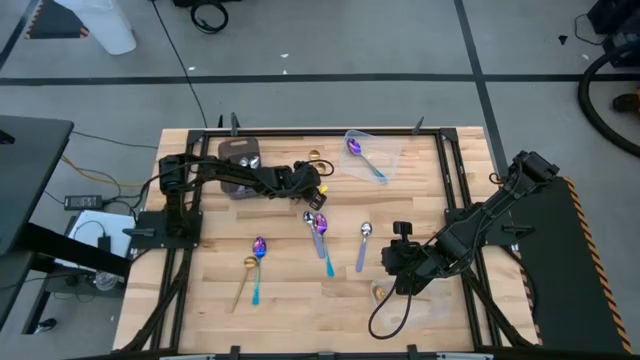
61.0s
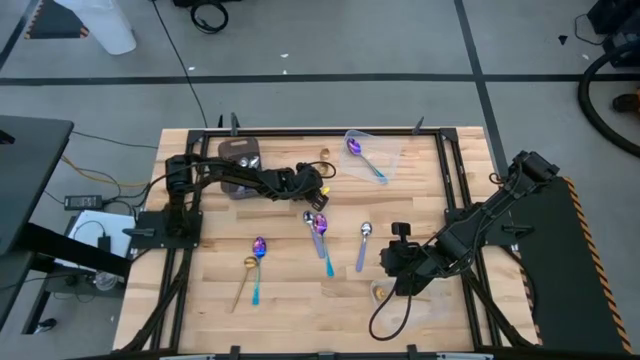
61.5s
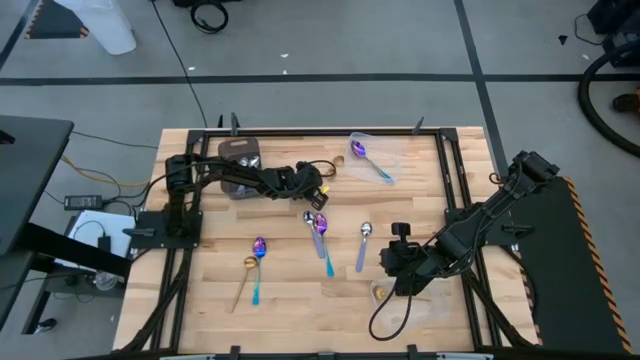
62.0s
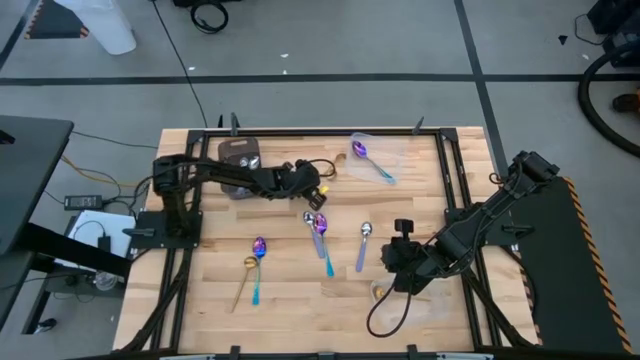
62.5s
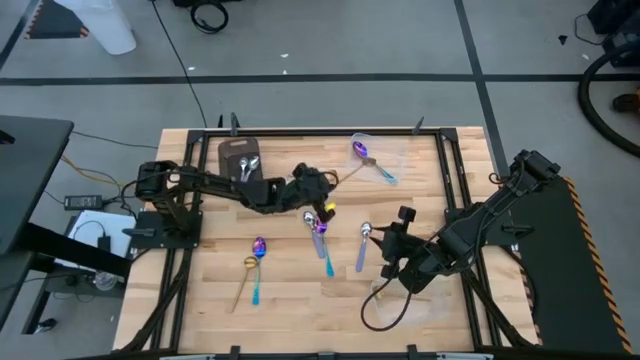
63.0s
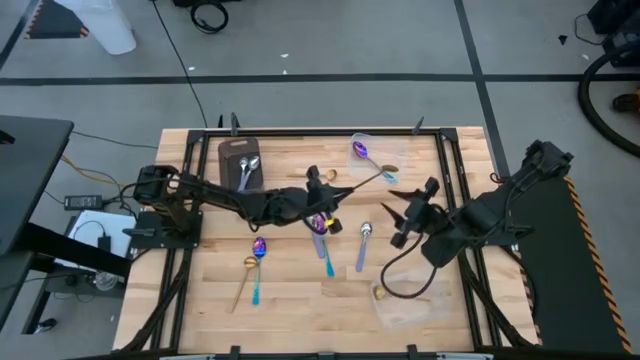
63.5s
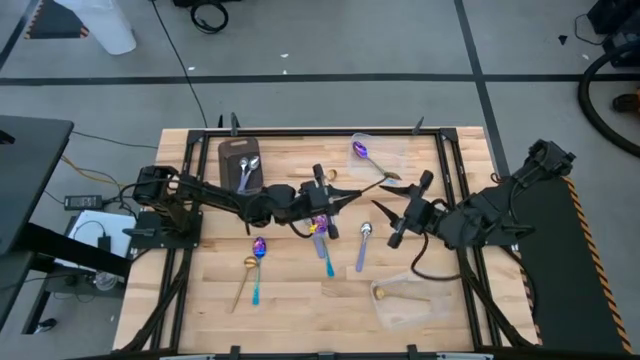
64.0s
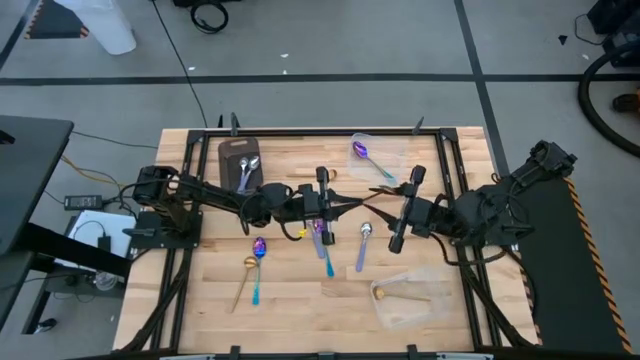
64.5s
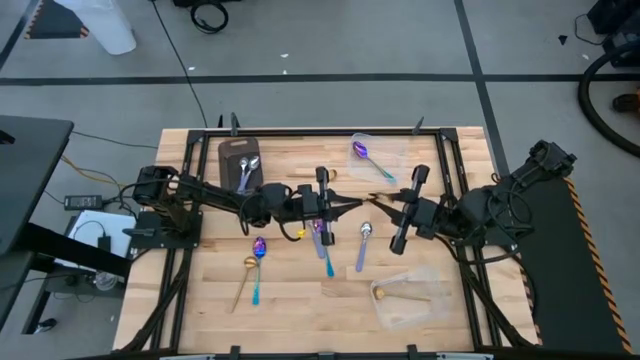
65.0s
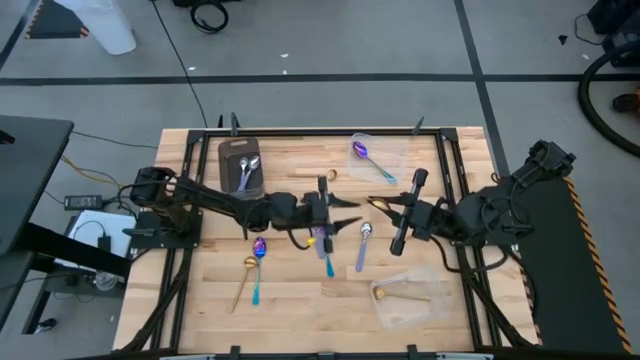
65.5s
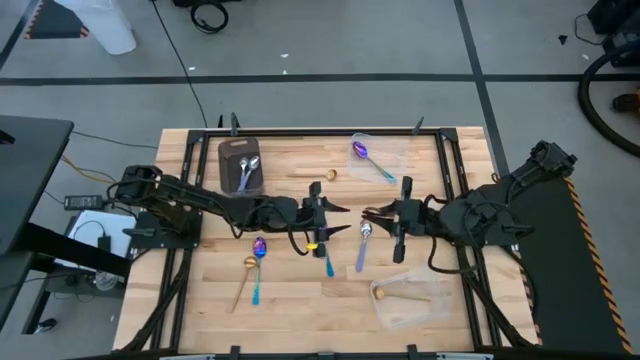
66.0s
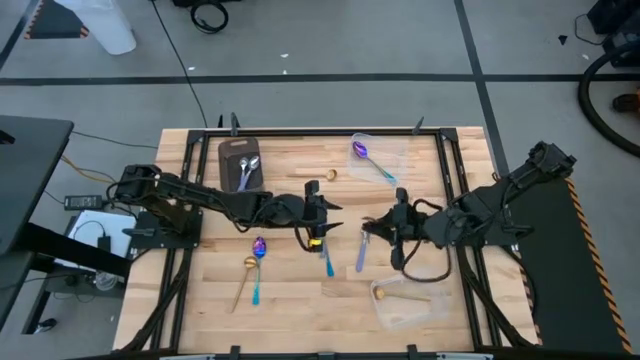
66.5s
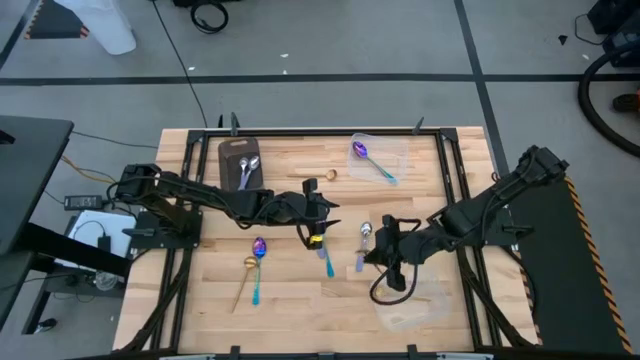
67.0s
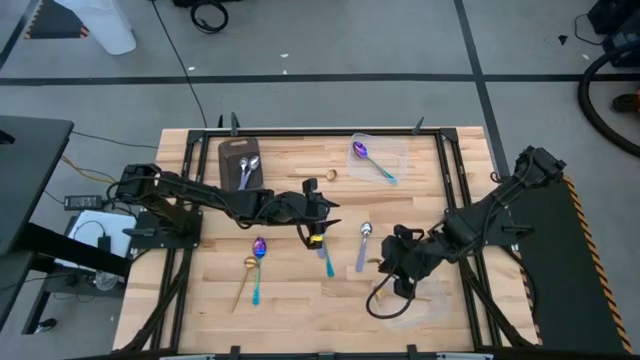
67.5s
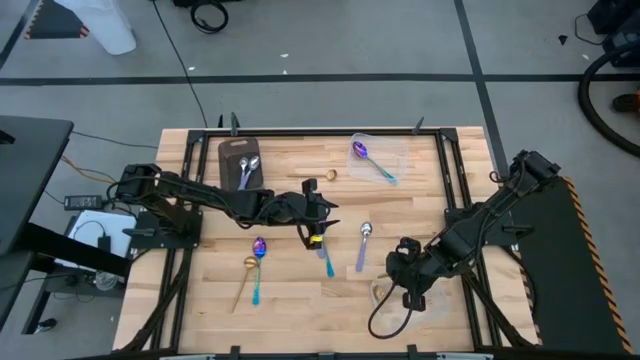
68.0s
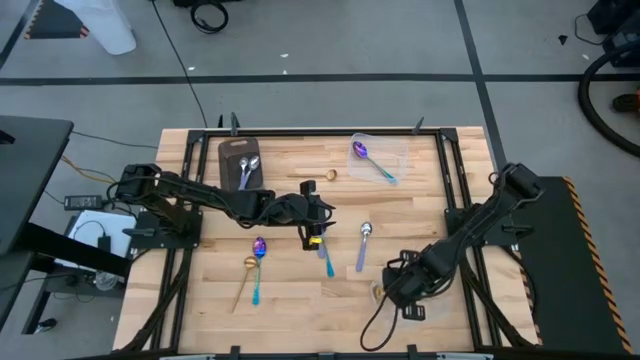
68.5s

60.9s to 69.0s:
Task: Sort silverware by color (type)
Put the yellow spoon into the bottom transparent bin

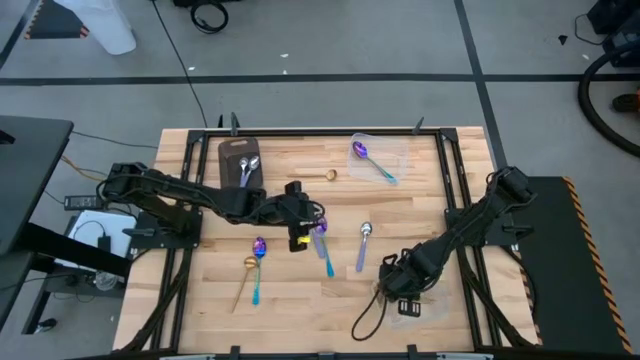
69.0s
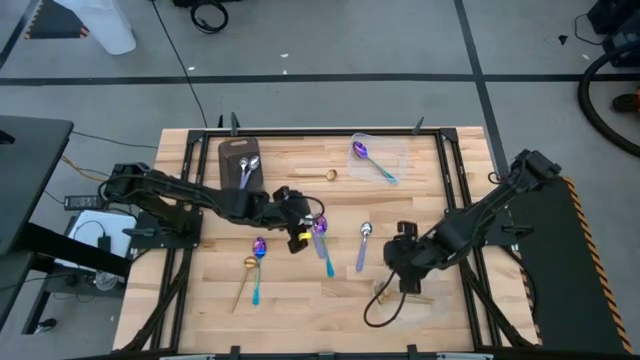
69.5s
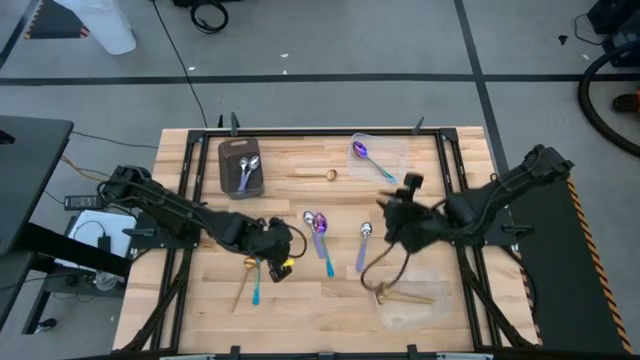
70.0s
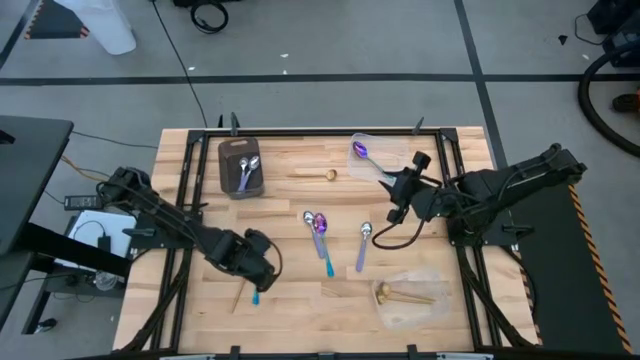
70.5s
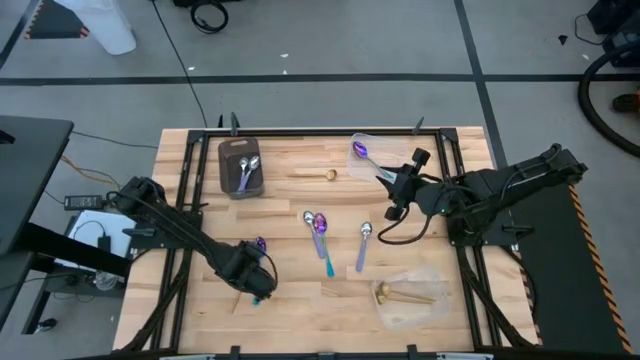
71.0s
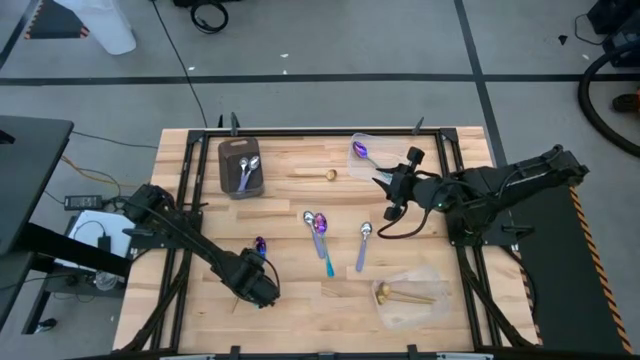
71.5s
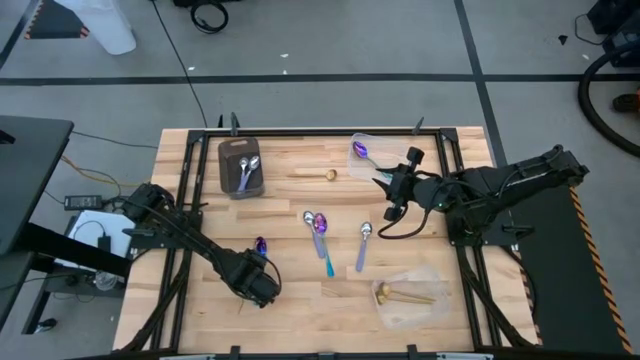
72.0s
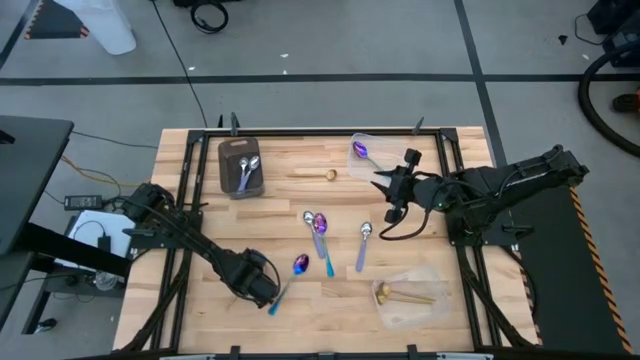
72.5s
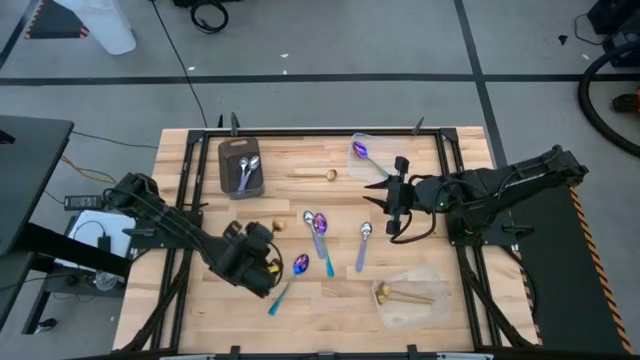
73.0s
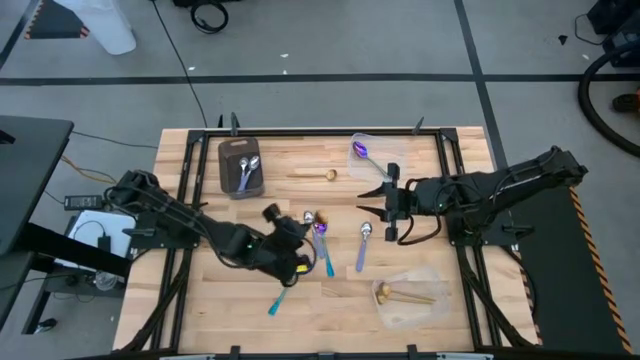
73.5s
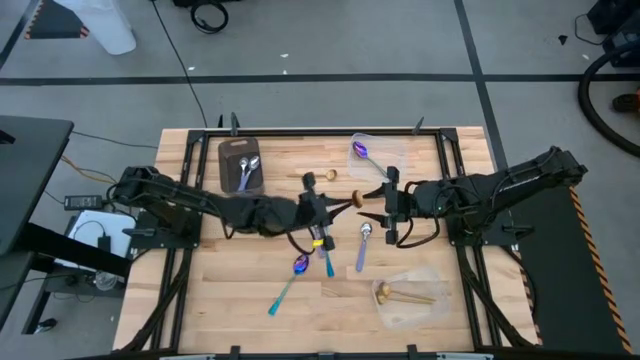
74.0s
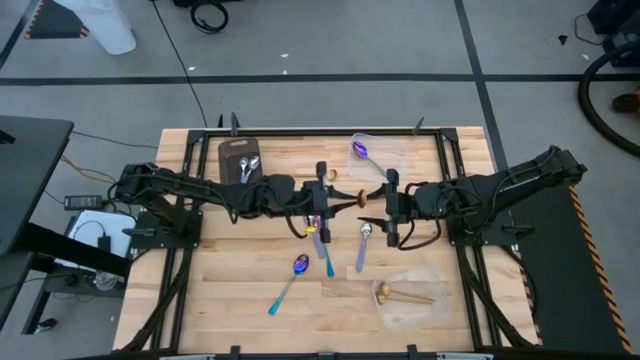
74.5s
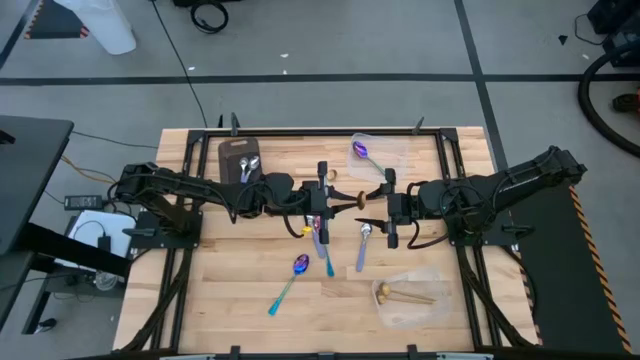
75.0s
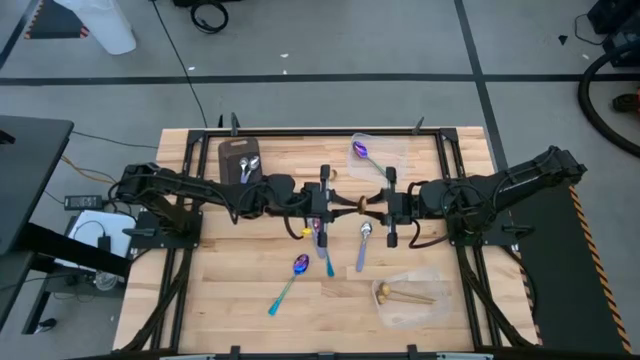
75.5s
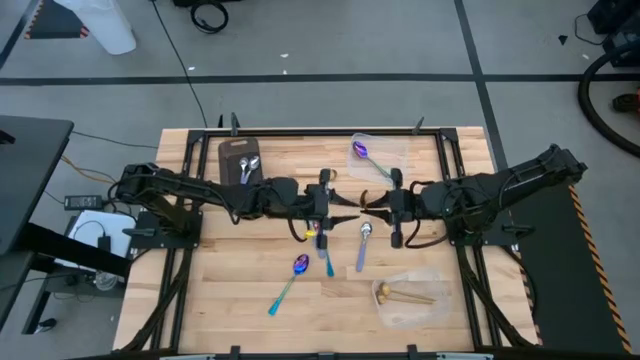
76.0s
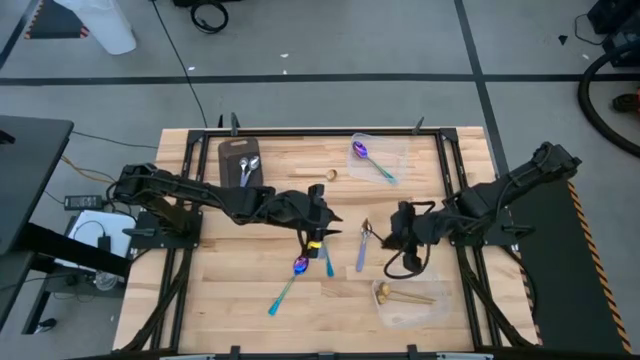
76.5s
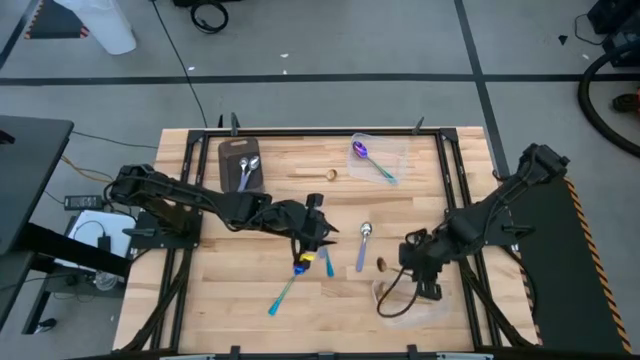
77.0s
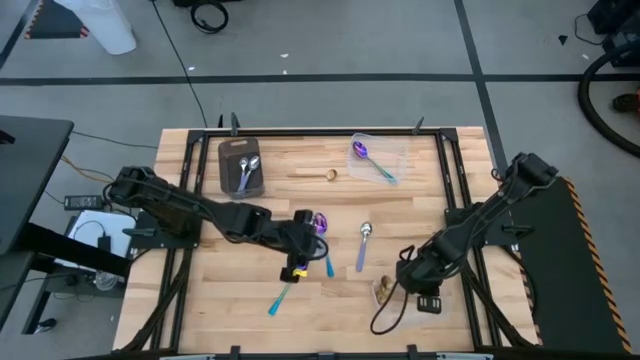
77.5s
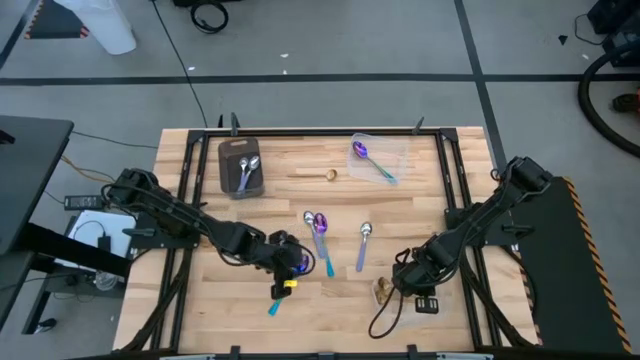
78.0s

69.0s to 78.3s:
Put the yellow spoon into the bottom transparent bin

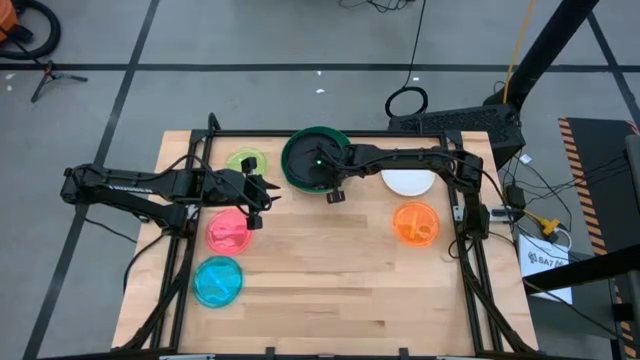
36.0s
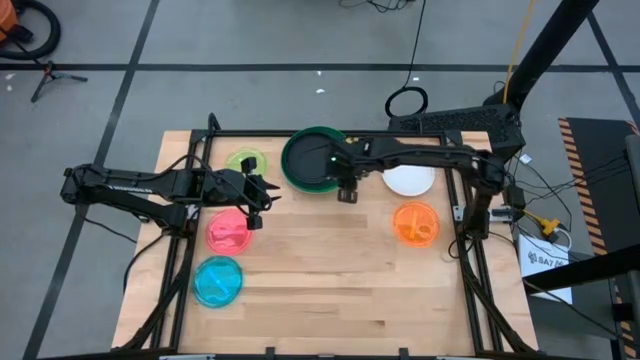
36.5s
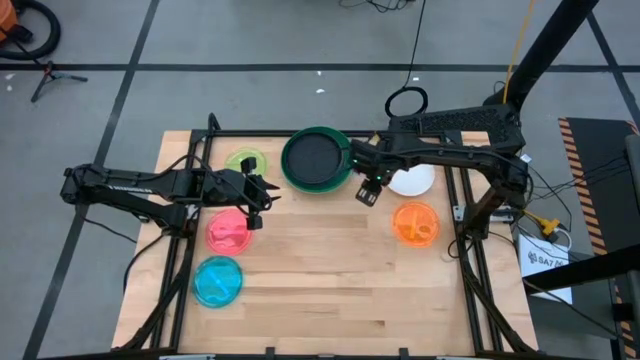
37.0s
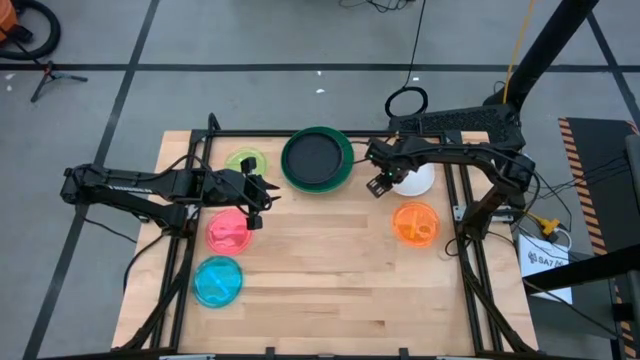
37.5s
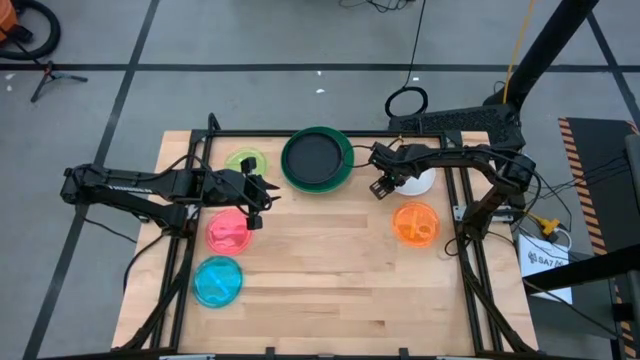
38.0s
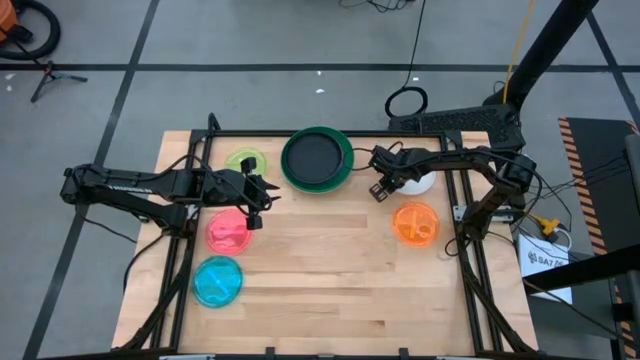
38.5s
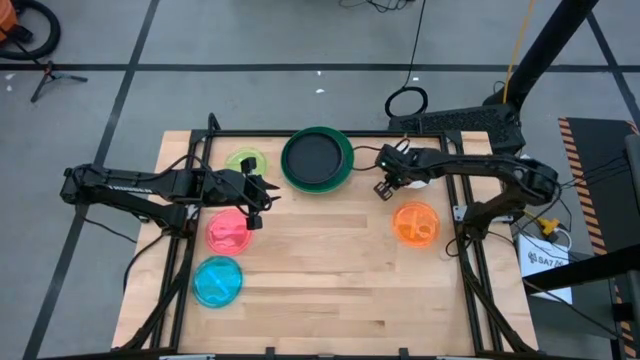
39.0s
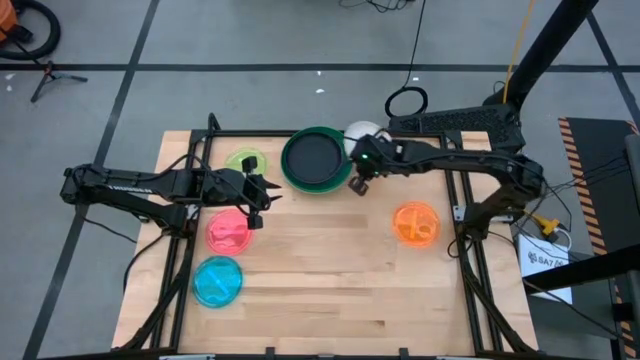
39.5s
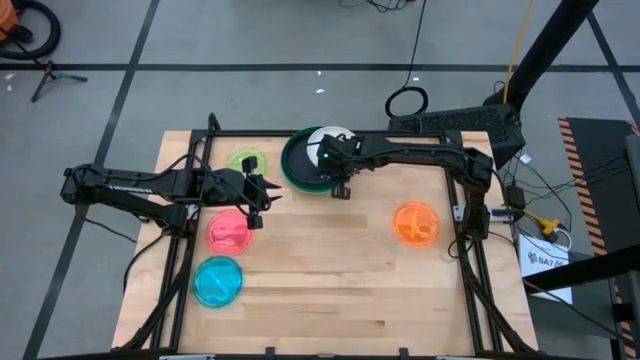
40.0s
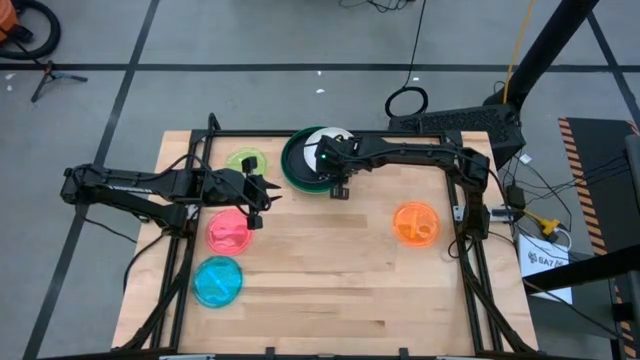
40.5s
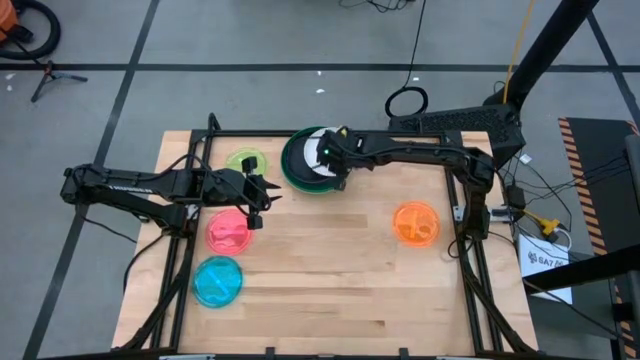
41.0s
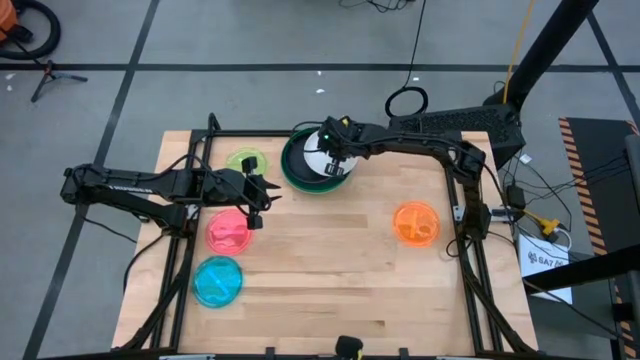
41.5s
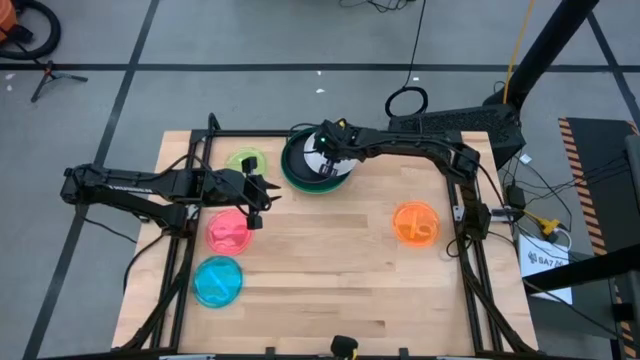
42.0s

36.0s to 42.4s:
Task: Stack plastic plates
Stack the white plate on top of the black plate
